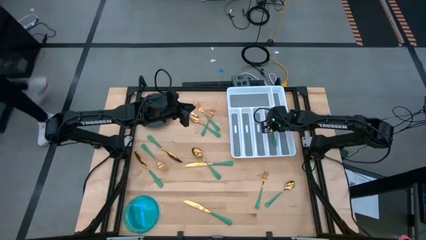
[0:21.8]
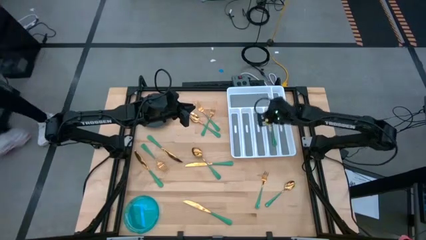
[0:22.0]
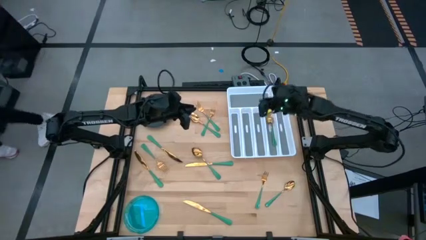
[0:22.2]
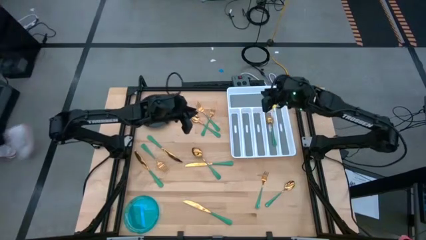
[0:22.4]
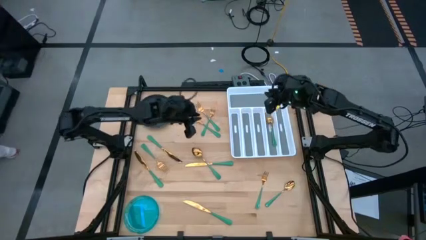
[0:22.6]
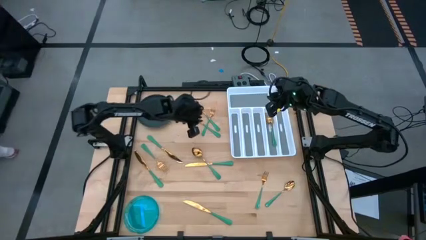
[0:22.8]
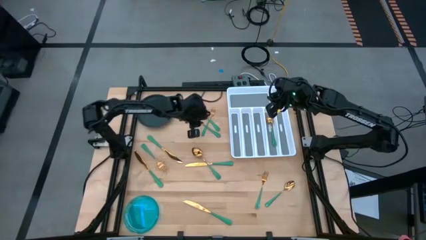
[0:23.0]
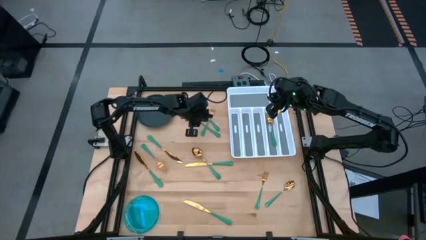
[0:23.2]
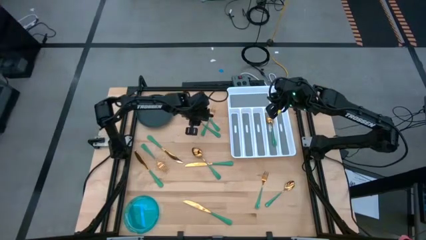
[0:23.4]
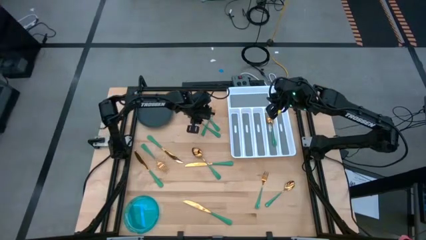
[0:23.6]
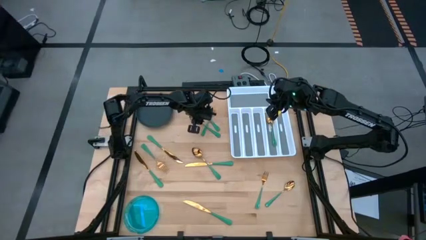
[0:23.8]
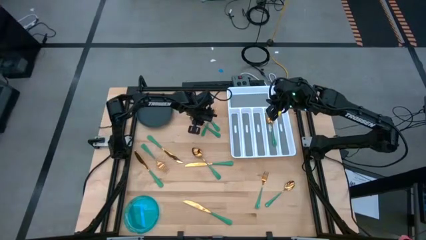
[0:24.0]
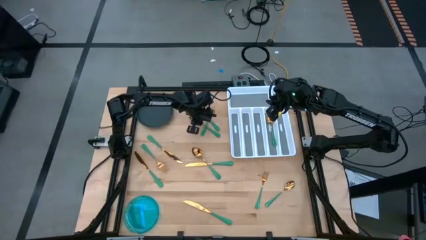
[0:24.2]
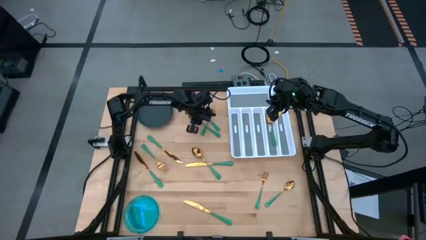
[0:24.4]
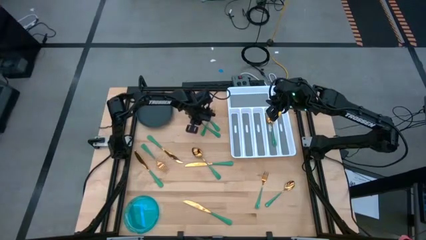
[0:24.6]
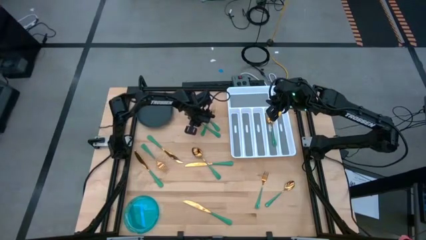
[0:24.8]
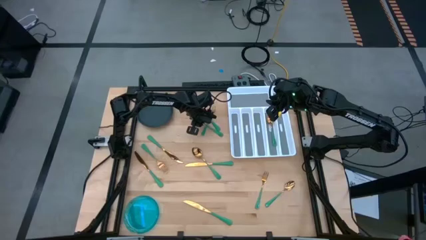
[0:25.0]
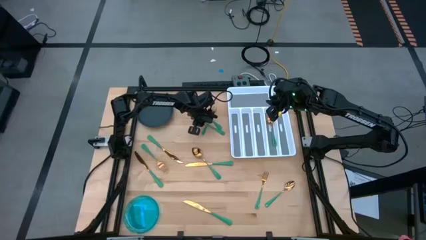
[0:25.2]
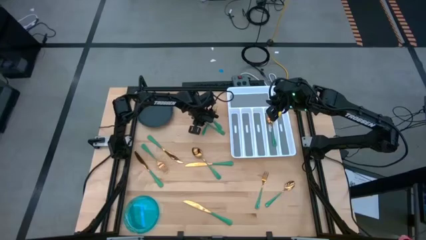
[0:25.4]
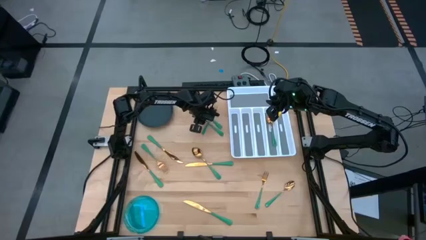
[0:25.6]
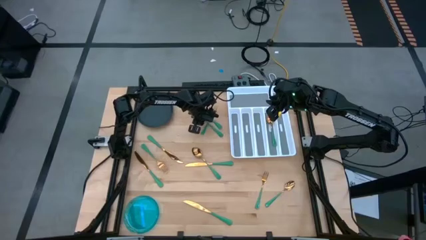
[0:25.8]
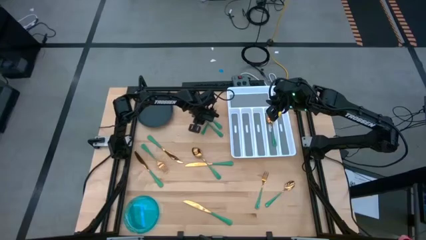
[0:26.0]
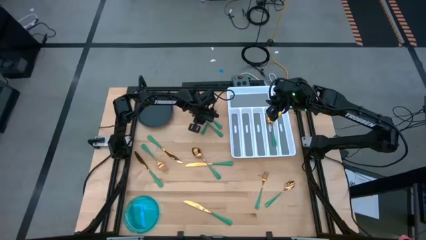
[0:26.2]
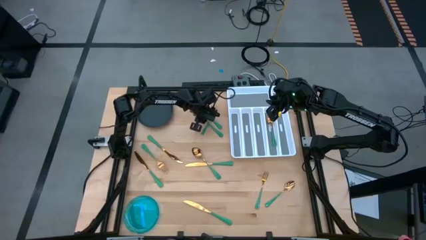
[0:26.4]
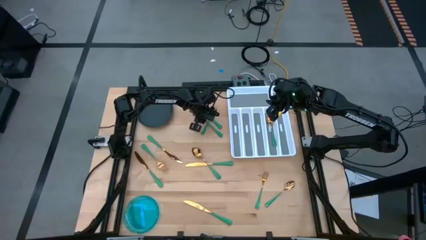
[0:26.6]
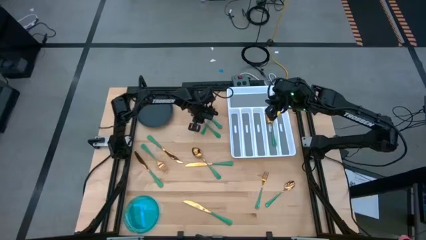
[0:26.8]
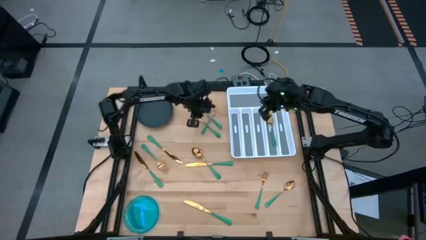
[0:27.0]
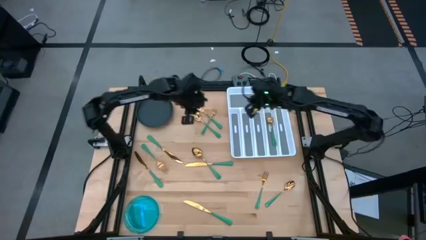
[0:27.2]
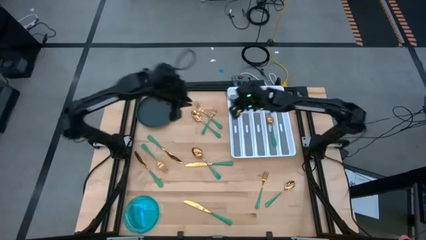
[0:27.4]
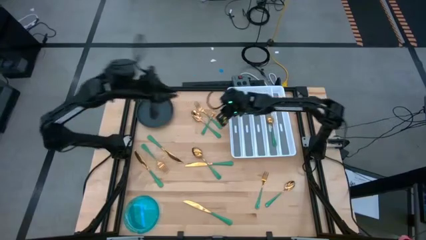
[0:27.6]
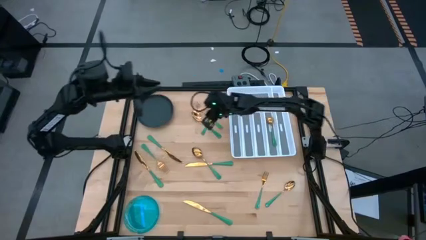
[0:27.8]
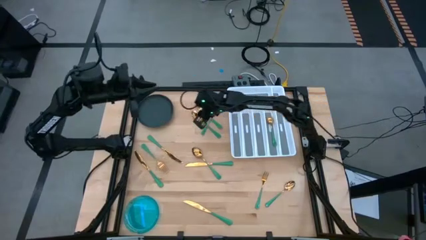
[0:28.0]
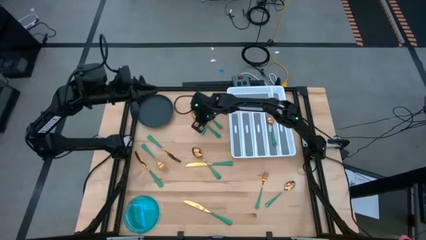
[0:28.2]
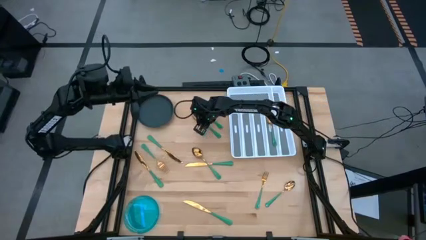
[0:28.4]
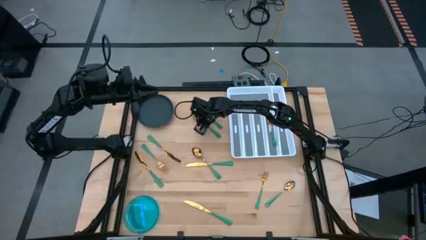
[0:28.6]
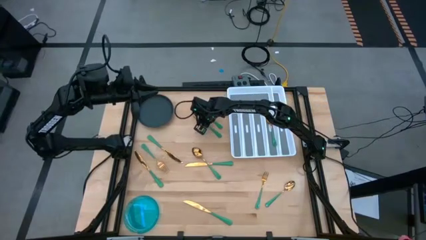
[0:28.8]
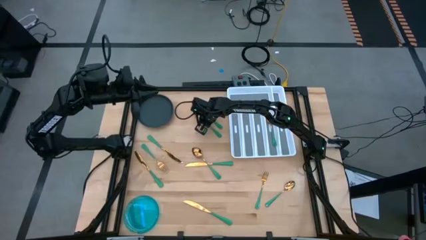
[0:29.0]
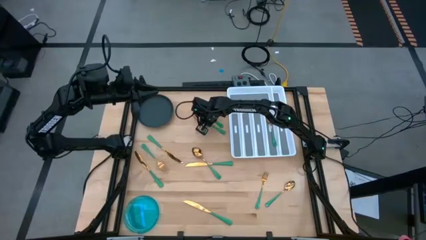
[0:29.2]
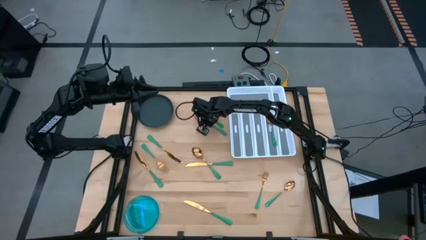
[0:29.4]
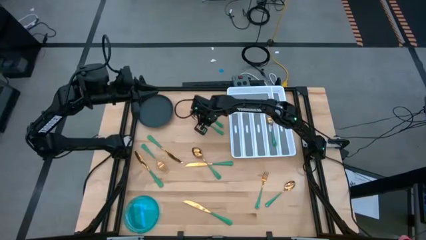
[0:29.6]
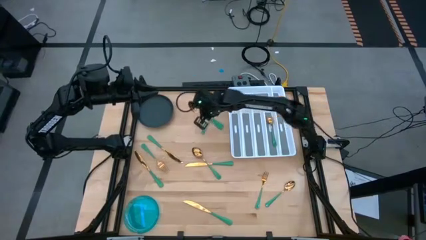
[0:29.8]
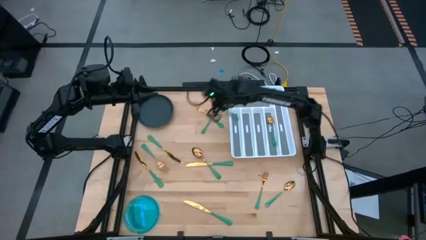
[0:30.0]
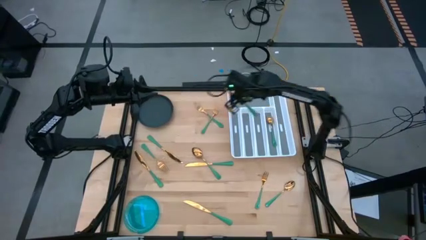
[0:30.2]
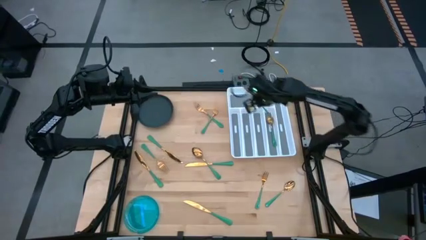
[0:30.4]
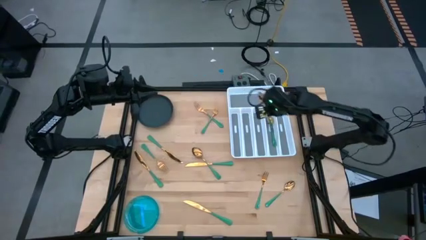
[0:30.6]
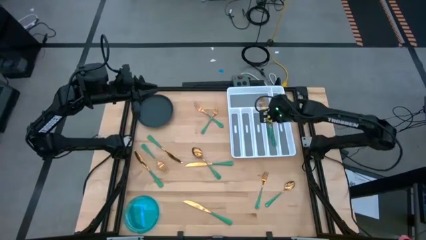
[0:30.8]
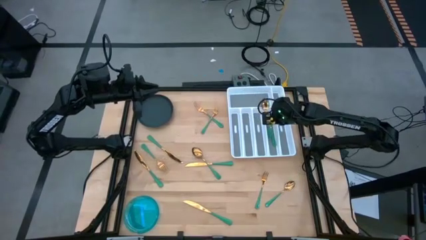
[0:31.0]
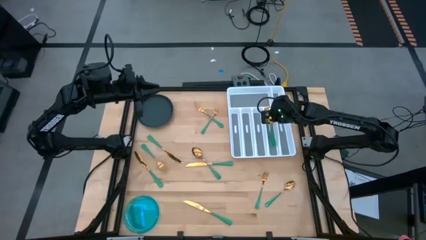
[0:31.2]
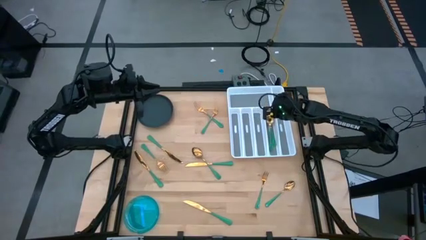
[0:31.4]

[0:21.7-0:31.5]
Task: Sort silverware
Put the green spoon into the white silverware organizer

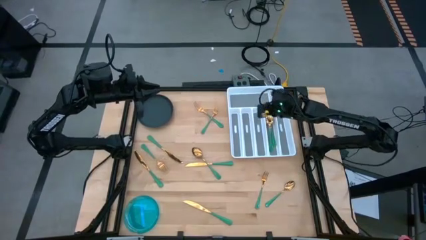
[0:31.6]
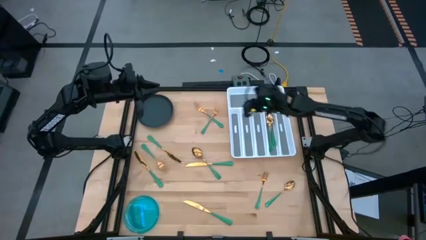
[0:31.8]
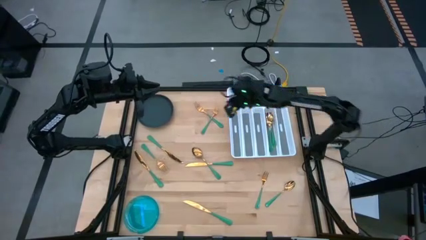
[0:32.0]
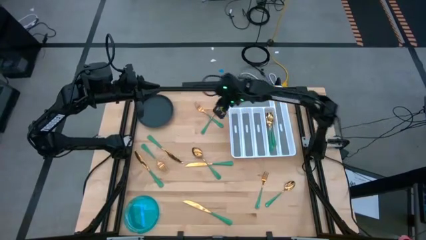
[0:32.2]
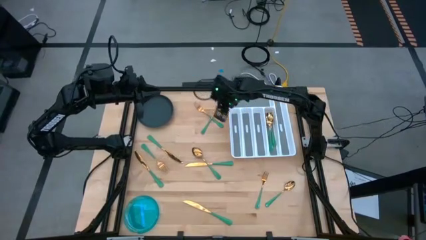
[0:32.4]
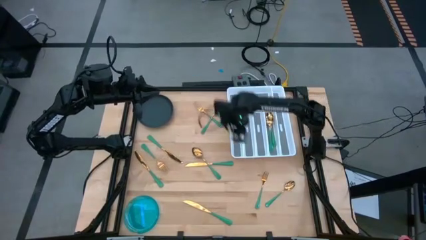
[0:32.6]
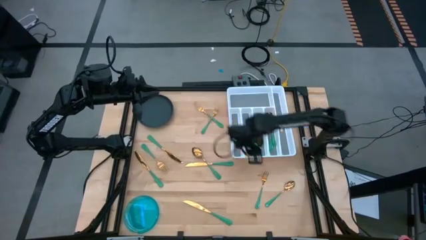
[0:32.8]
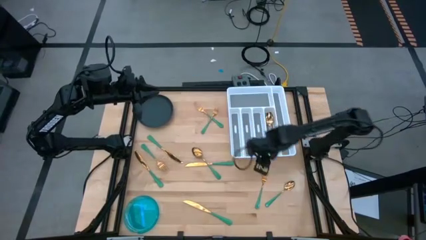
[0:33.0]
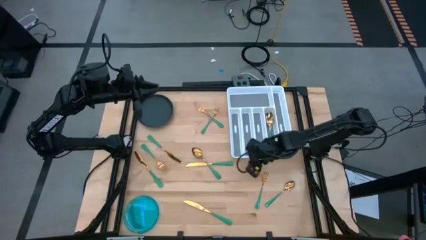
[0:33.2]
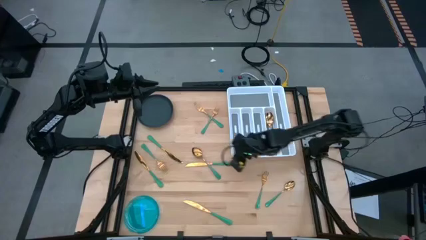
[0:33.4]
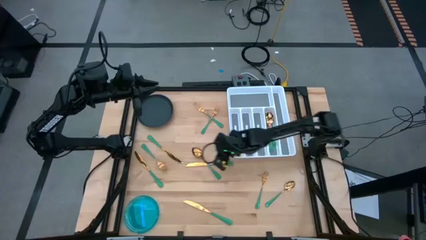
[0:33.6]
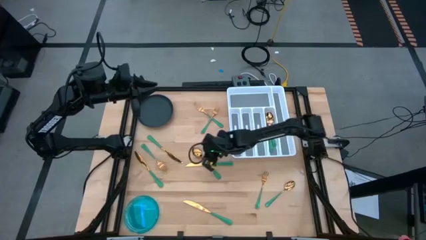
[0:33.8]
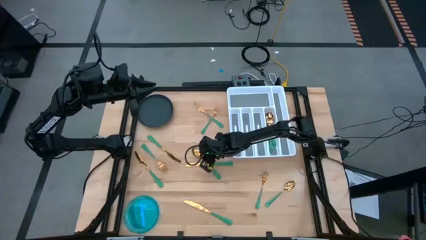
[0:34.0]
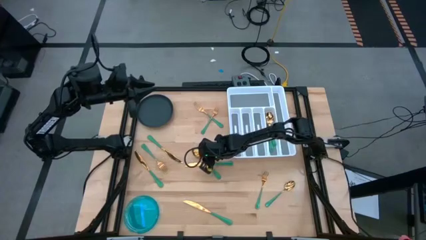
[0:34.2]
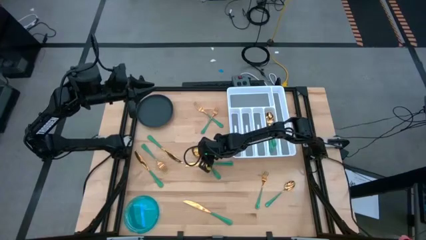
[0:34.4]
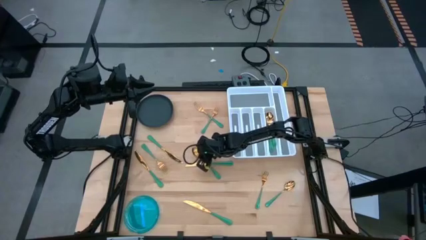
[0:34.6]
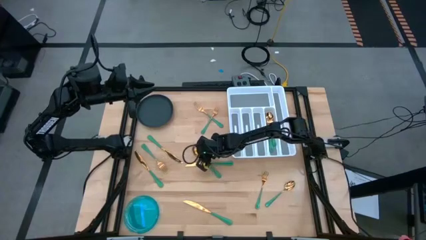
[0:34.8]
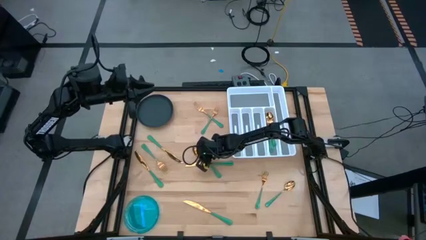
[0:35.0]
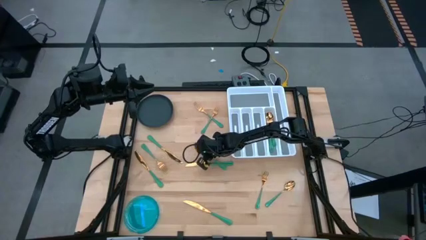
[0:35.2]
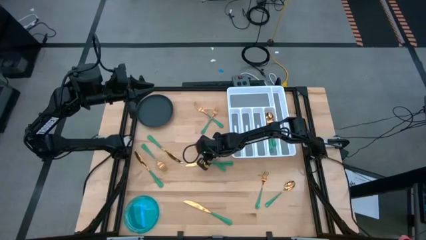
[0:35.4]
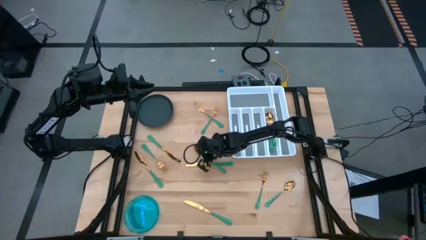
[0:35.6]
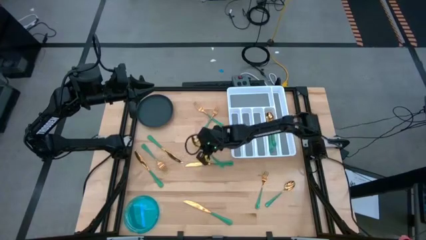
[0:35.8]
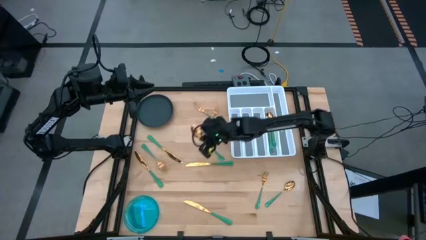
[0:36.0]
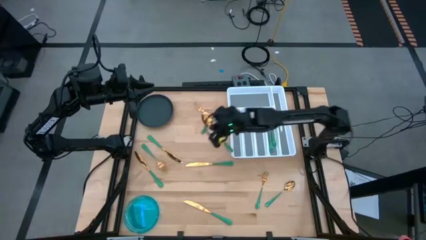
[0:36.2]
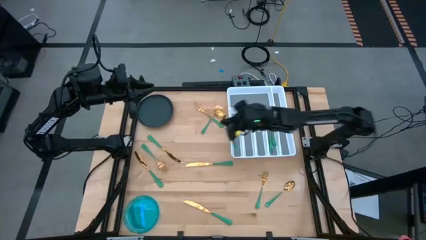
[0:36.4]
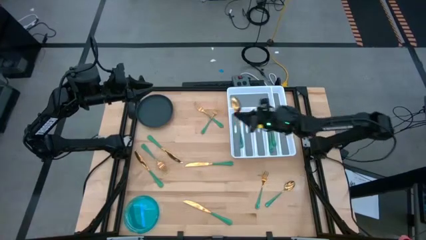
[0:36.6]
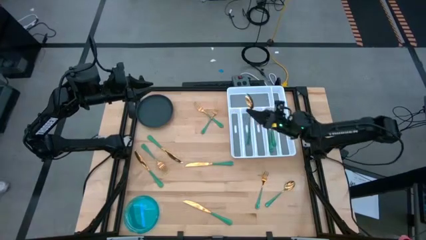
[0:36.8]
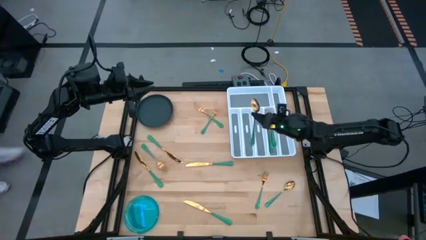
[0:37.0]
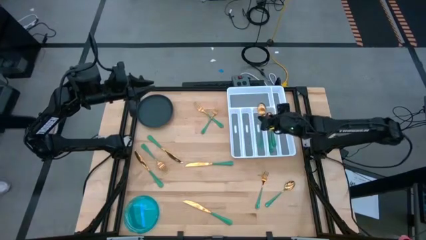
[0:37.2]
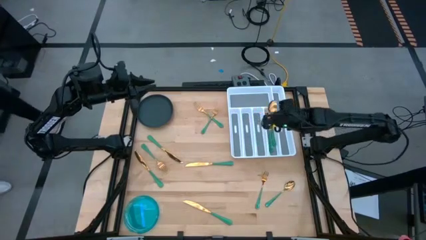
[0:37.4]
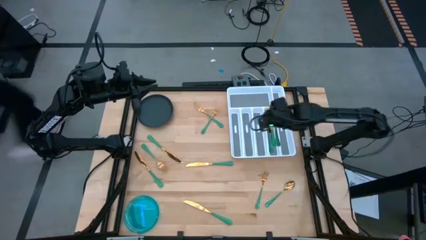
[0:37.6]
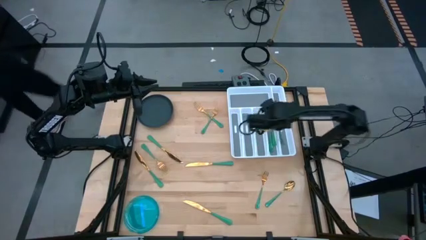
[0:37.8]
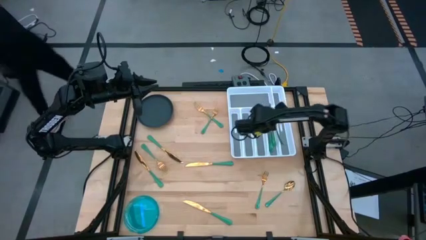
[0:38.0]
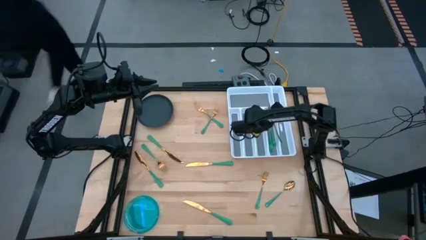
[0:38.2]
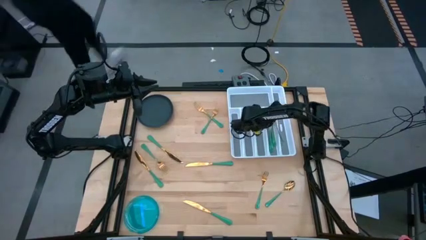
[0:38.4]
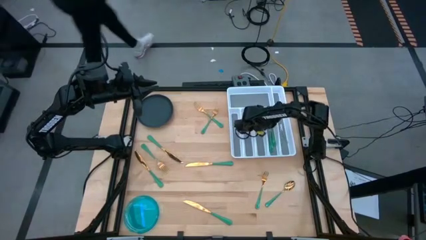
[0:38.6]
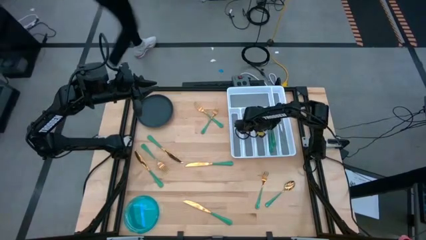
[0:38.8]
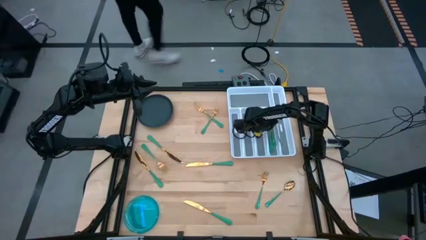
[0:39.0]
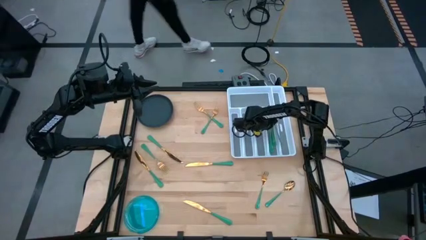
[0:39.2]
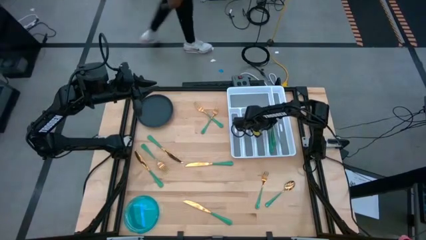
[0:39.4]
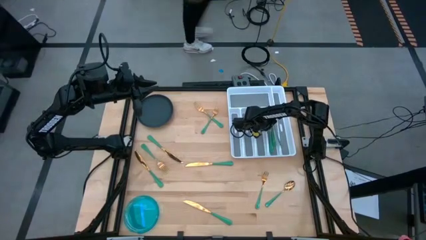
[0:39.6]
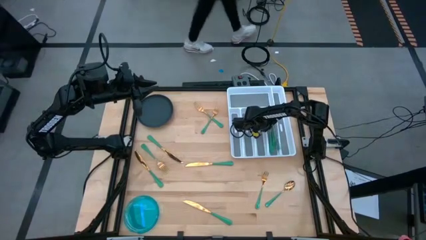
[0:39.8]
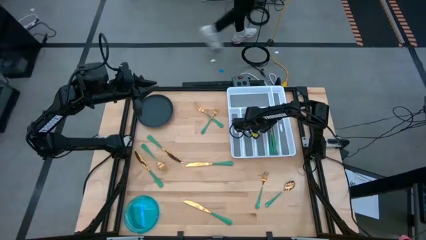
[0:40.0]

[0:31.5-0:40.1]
Put the green spoon into the white silverware organizer
